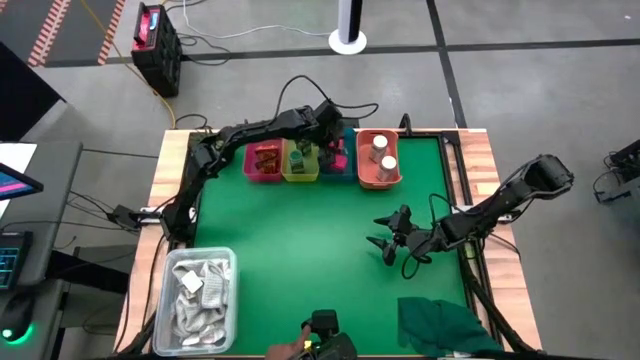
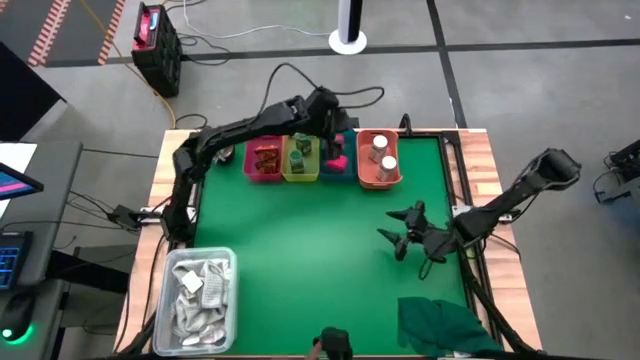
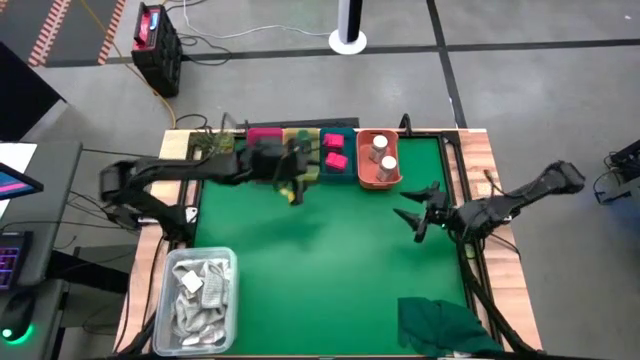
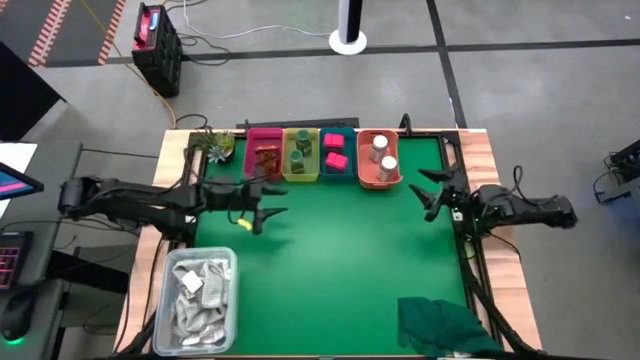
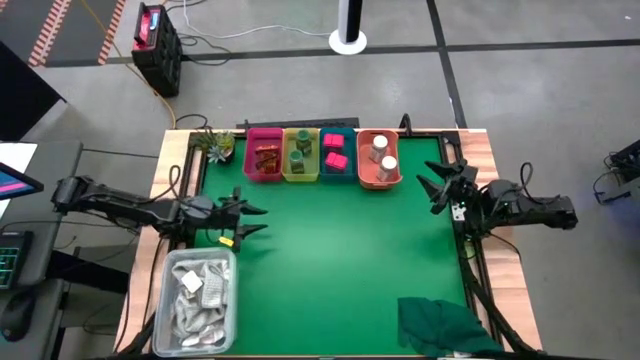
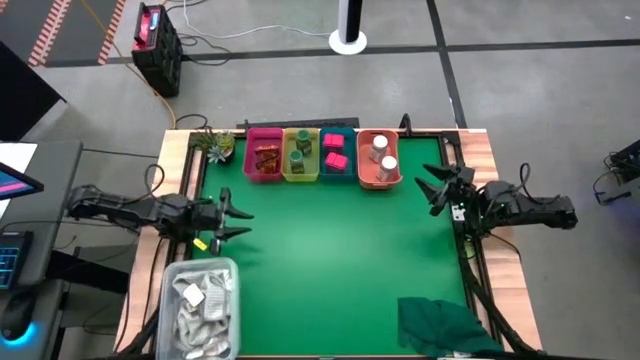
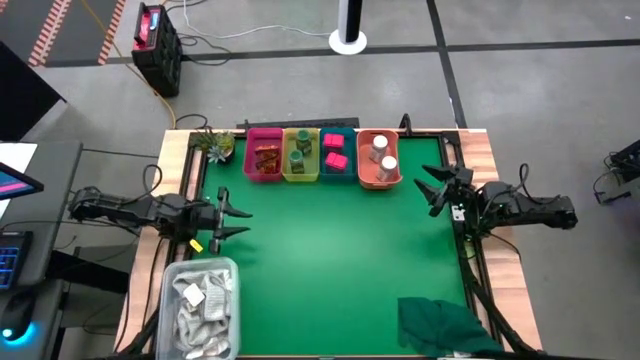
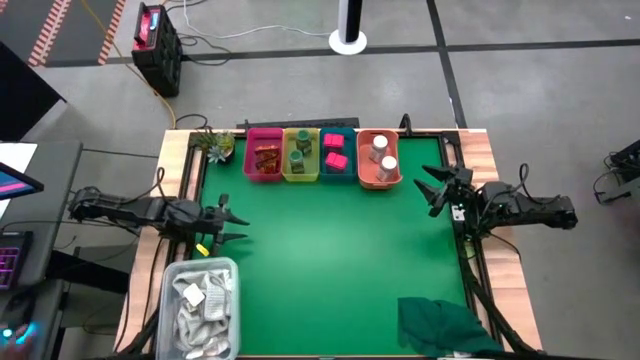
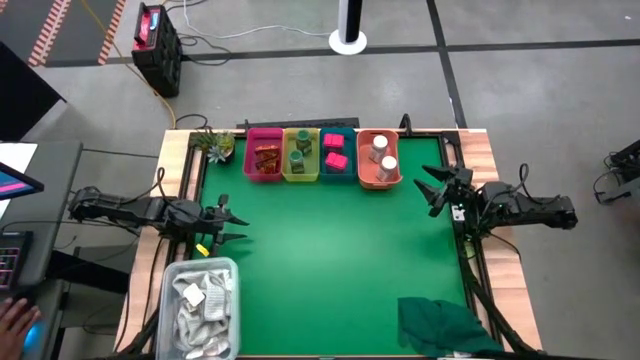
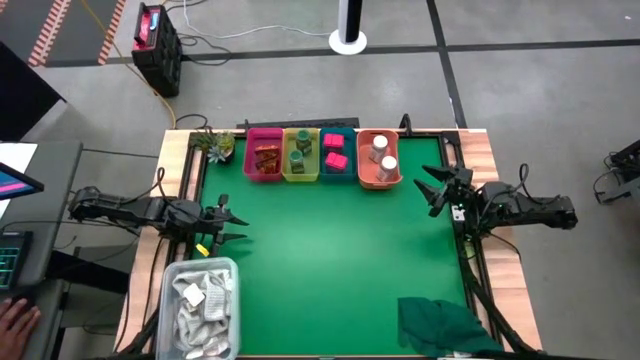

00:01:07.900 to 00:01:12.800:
Task: Sort spices by type
Return to Home position

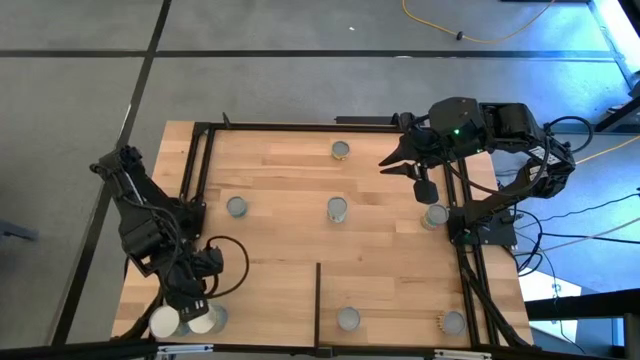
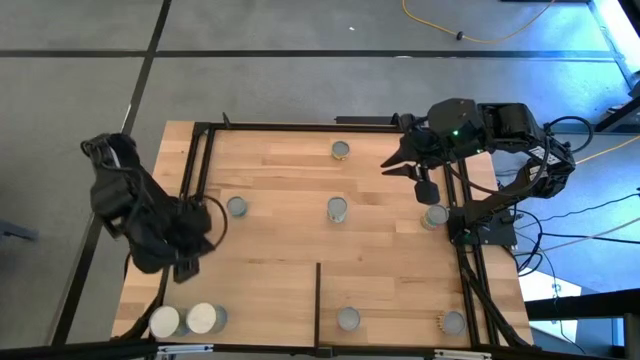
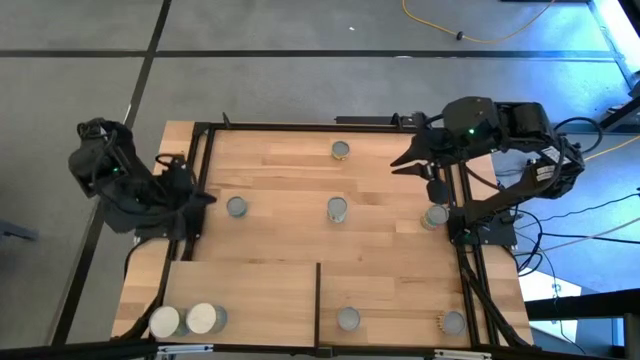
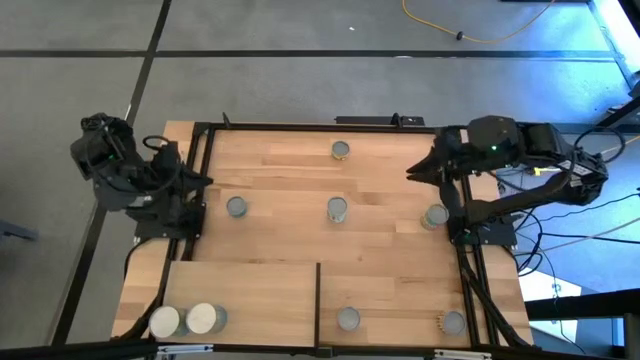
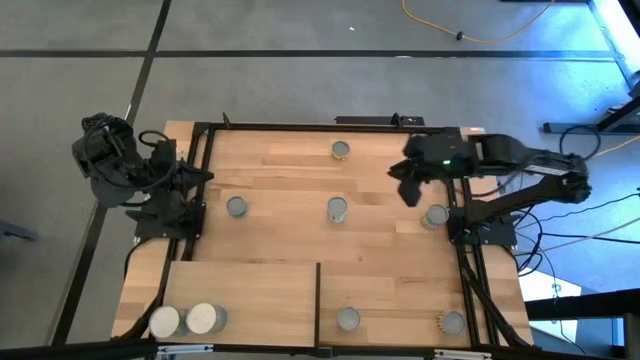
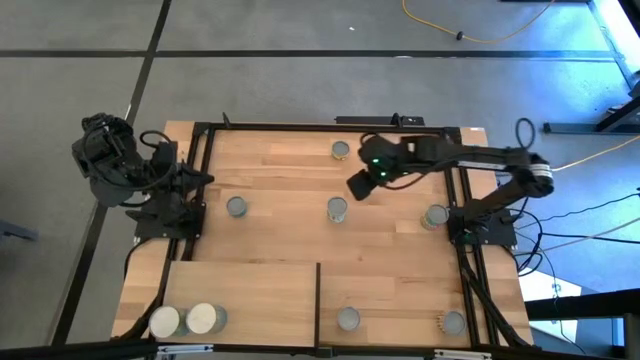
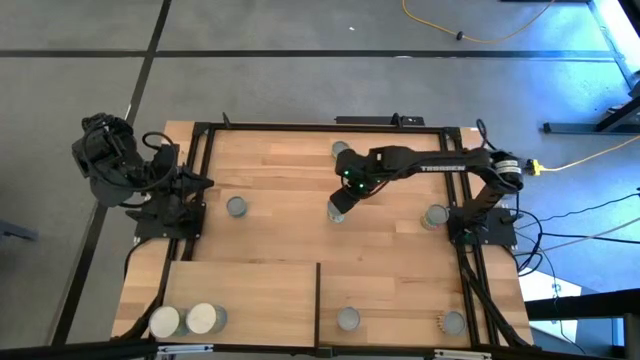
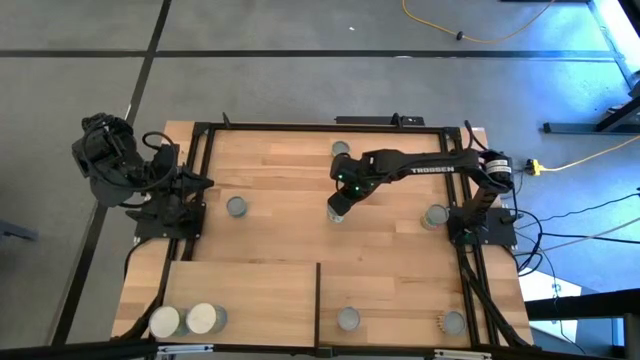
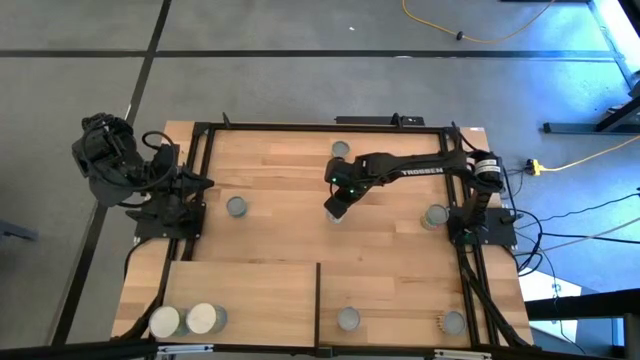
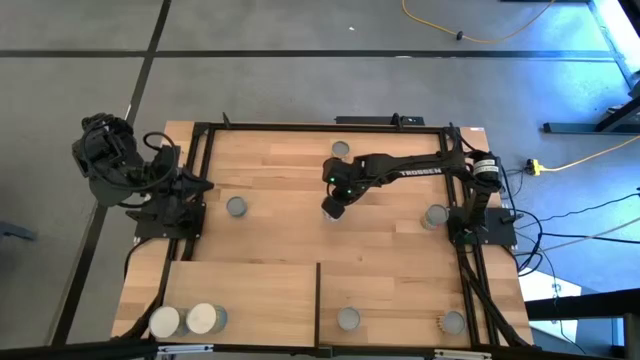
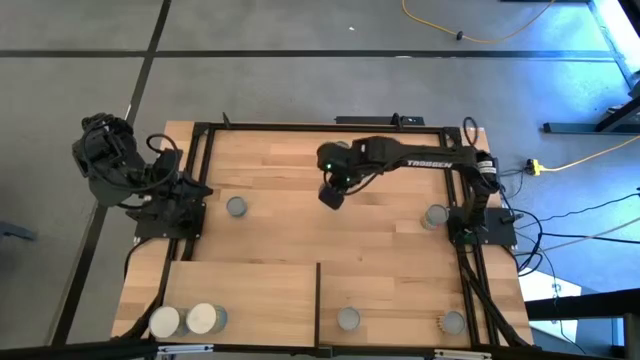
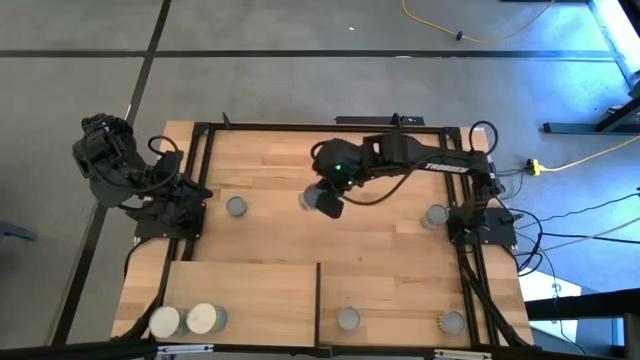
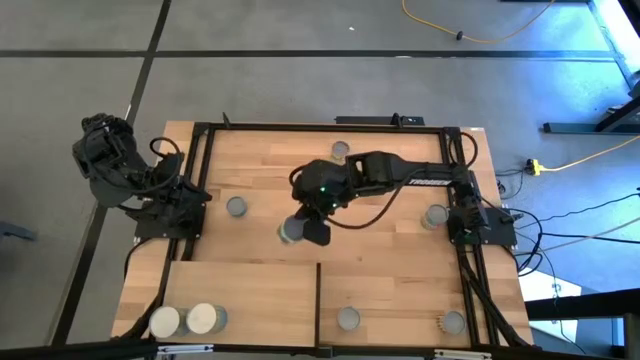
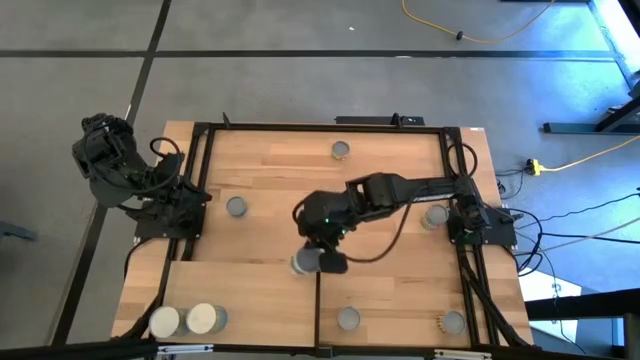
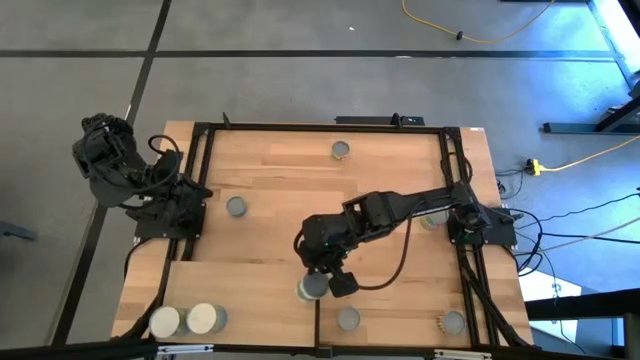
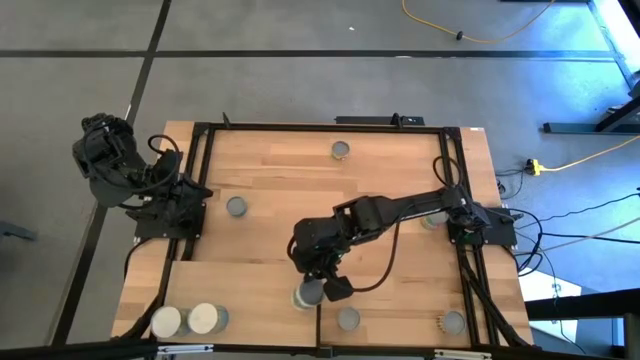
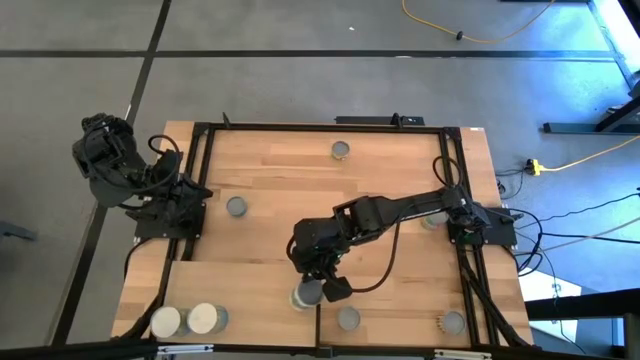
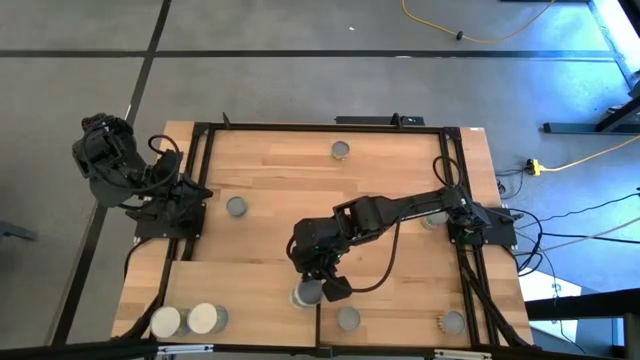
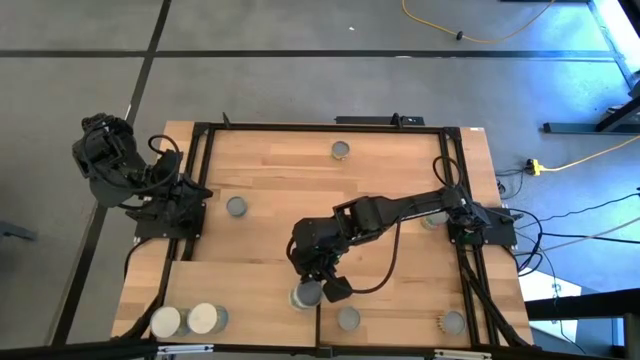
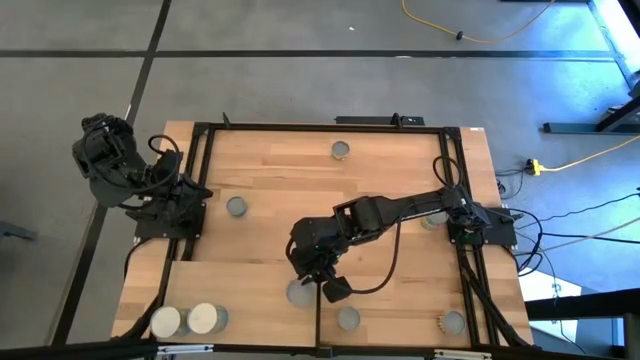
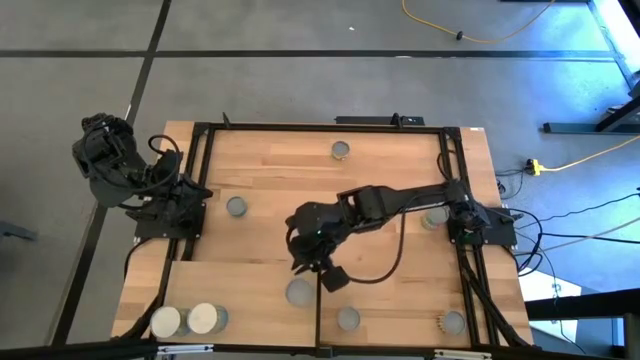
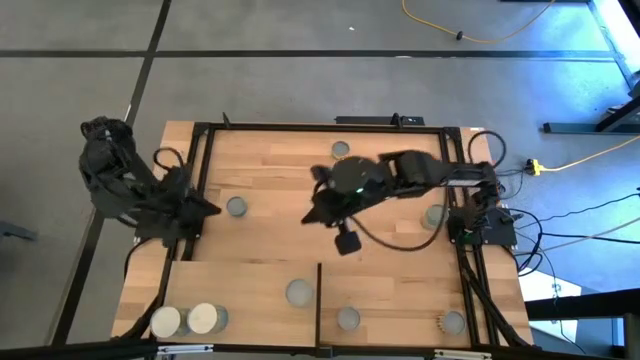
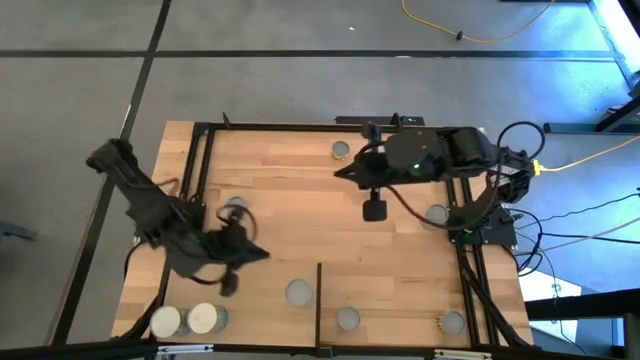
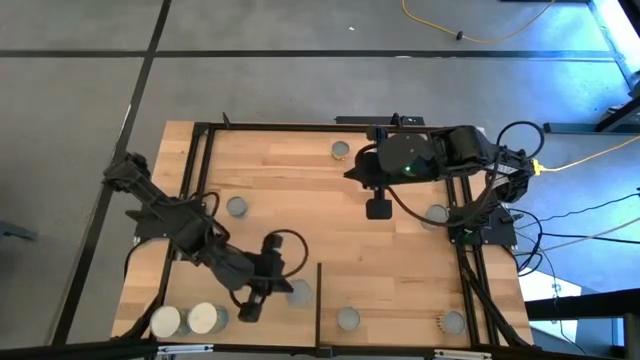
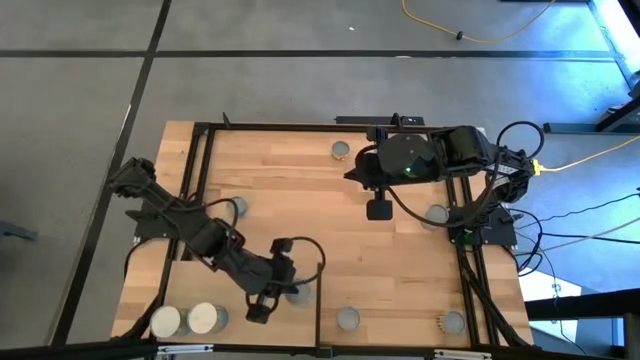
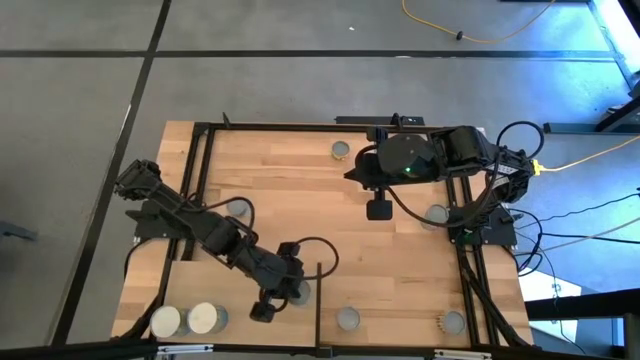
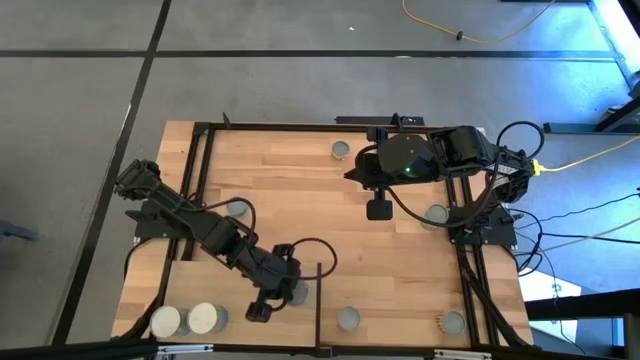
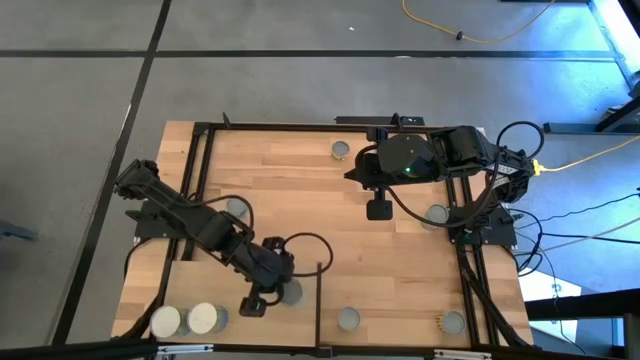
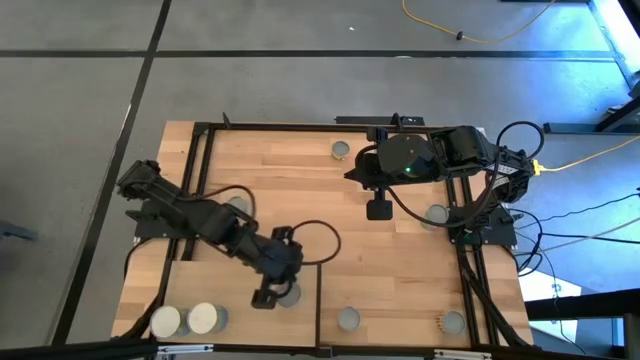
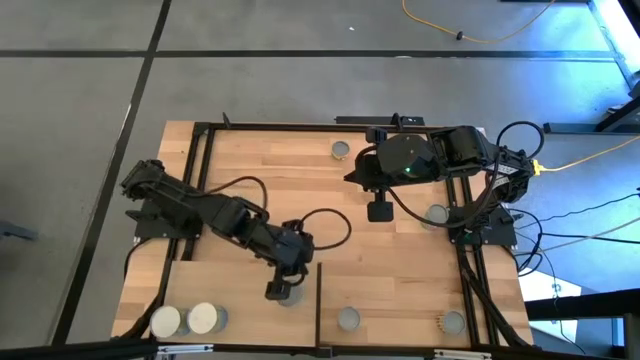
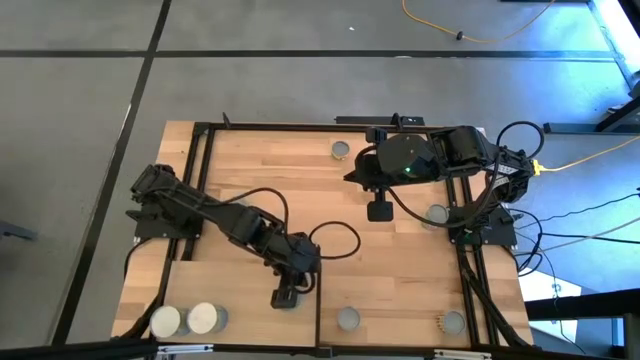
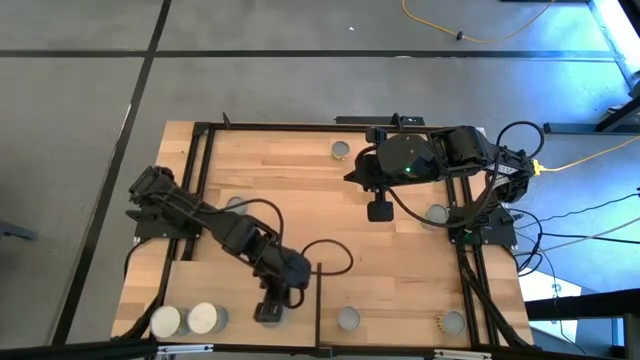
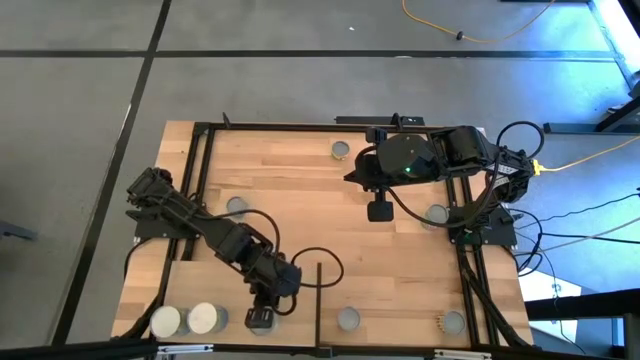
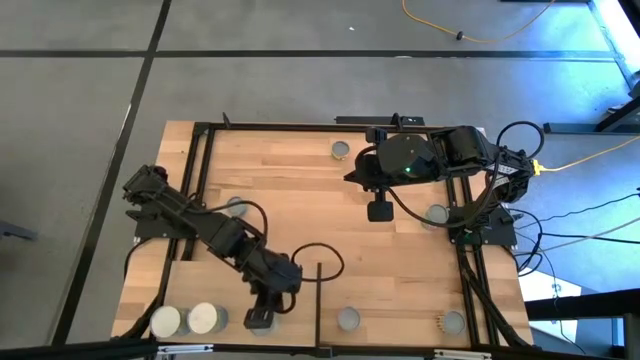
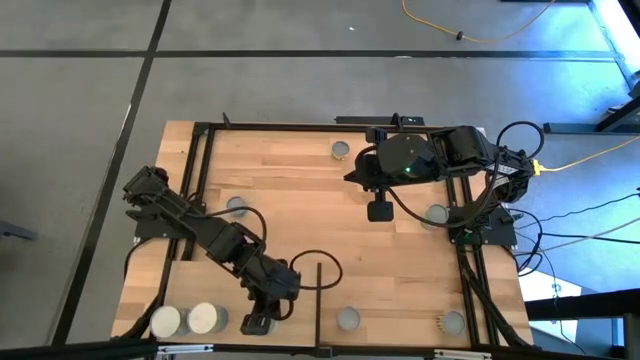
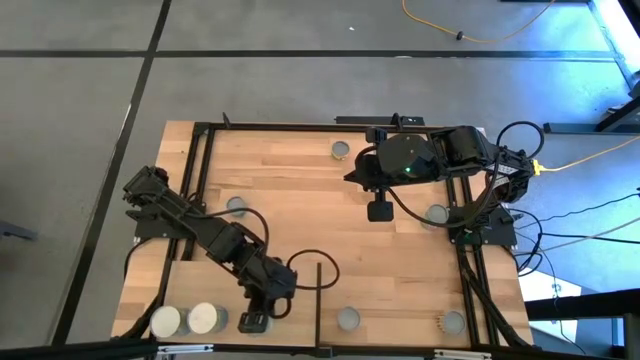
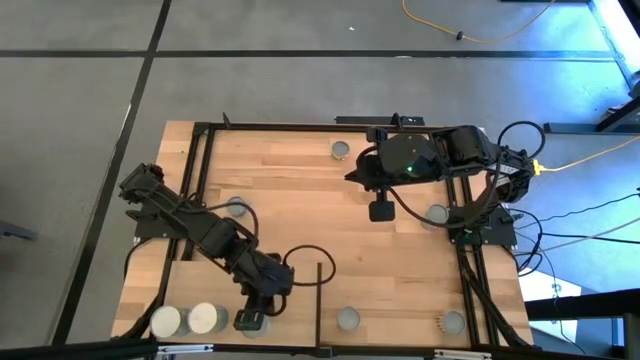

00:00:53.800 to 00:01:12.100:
Task: Pick and place cans onto a shelf
Put the canned mixed veggies on the shelf
